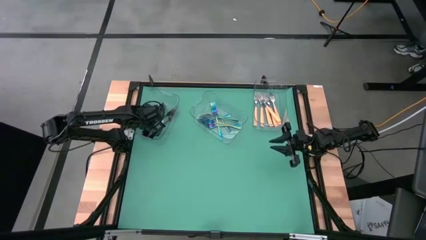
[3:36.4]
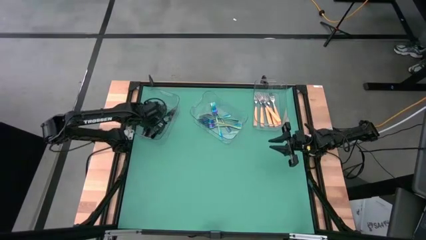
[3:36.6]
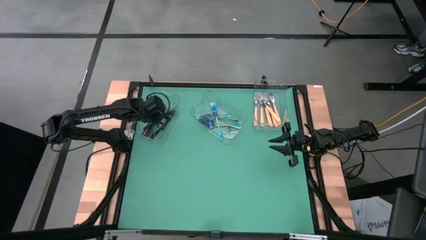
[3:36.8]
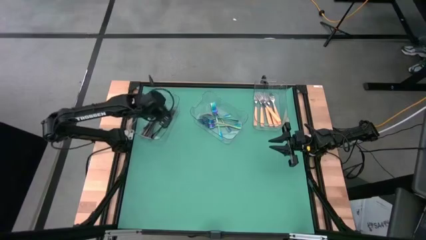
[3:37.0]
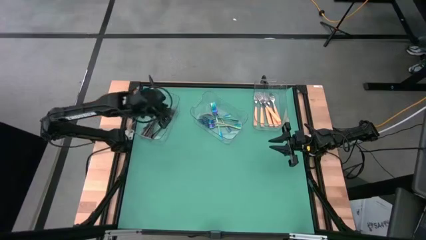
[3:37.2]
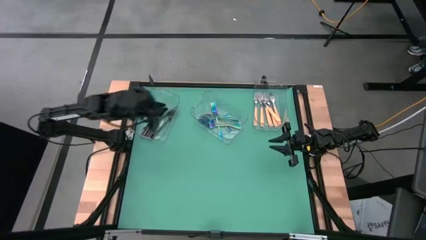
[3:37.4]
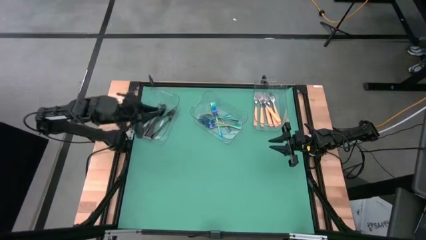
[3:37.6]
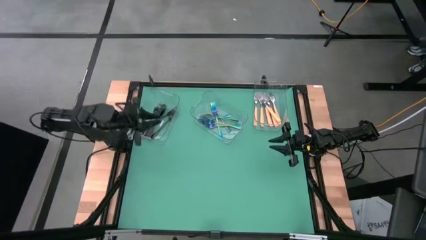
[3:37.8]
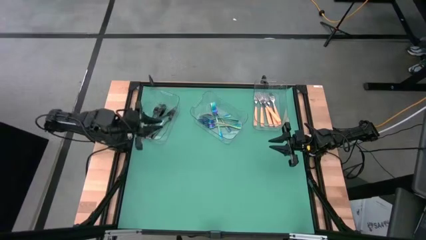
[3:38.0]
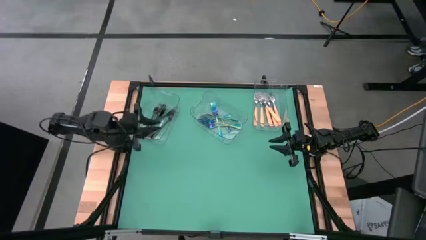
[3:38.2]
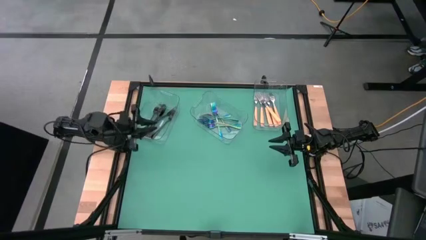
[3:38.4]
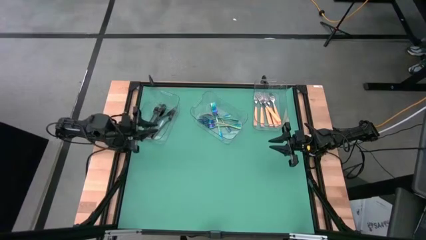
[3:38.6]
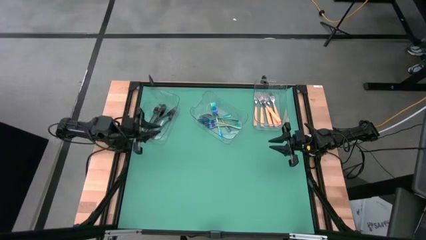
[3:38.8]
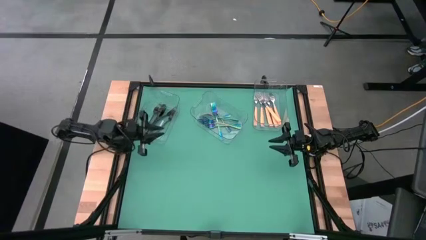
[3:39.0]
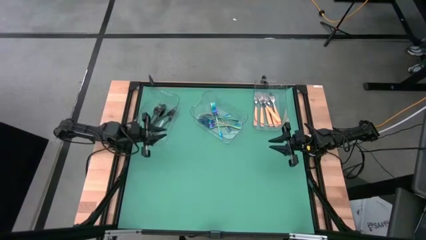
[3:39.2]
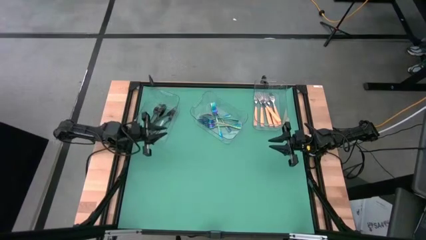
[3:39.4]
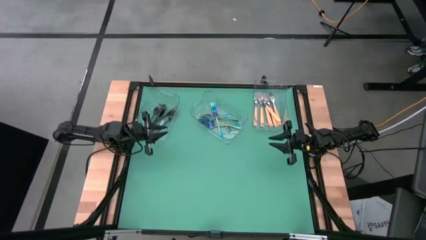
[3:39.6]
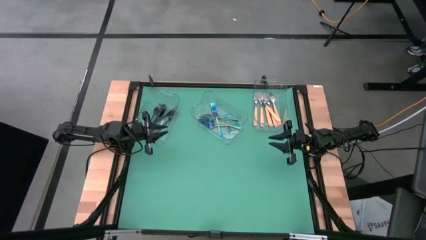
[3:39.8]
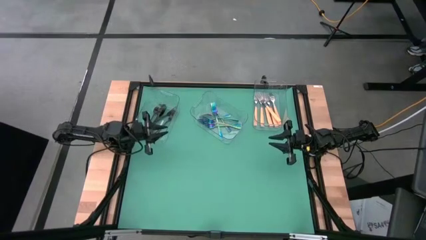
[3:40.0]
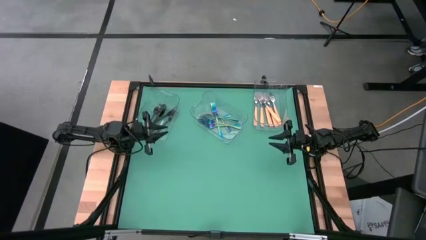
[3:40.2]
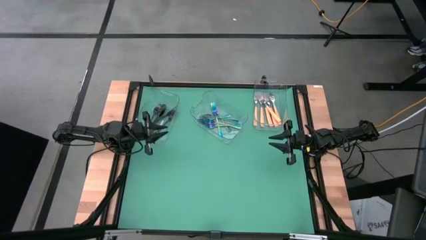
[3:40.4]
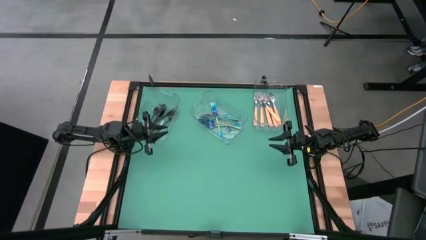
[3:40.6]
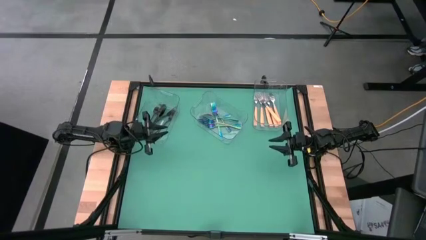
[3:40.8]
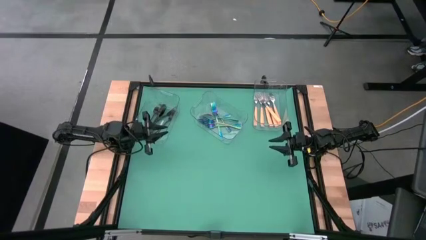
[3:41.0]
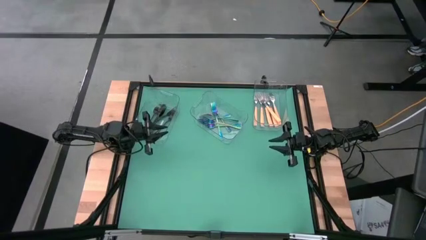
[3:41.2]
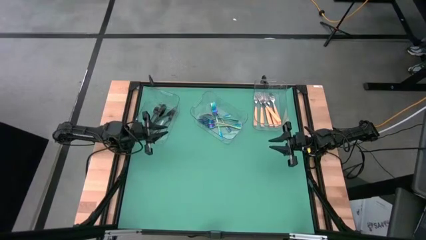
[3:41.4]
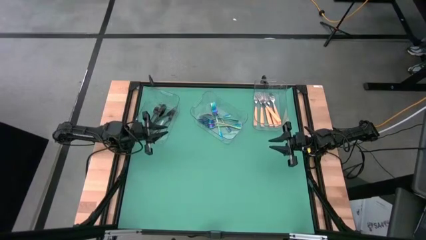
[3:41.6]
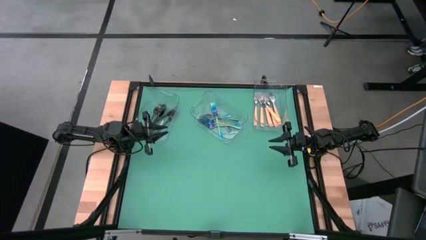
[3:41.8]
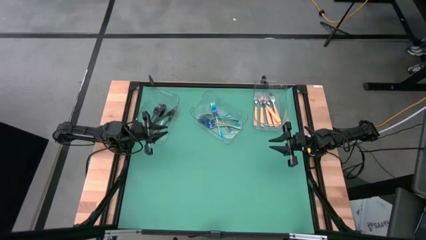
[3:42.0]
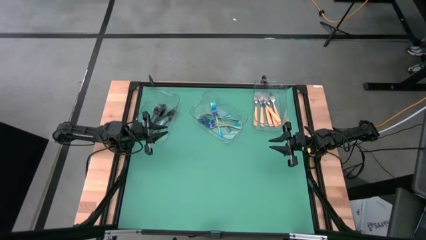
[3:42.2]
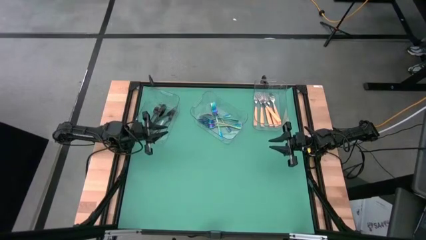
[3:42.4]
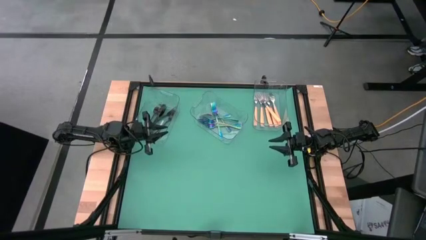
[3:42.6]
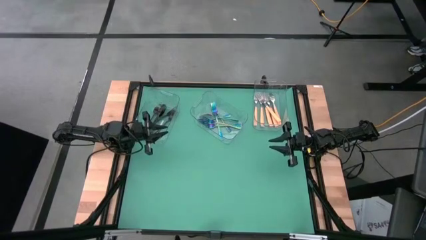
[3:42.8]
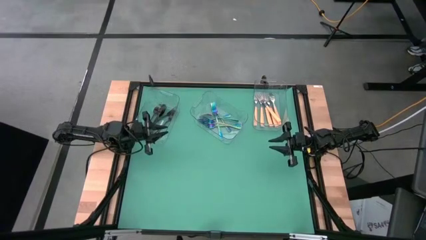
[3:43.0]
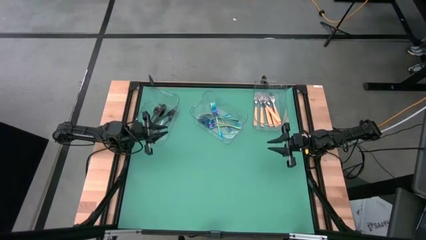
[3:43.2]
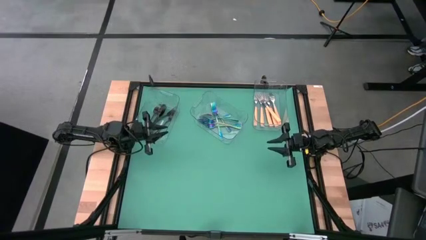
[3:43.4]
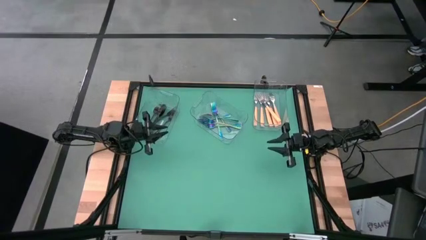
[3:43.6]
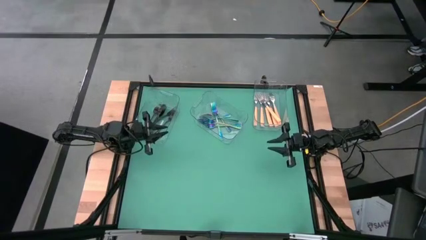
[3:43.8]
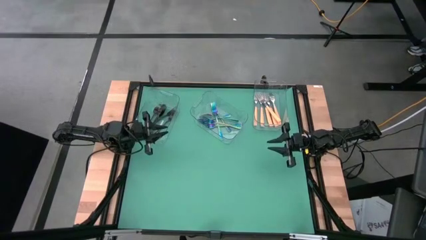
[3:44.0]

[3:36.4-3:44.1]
Task: Sort silverware by color (type)
Return to Home Position

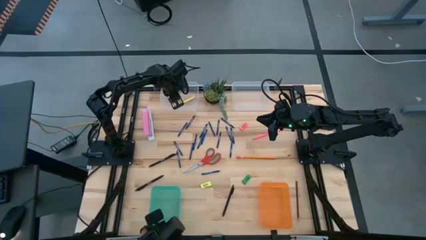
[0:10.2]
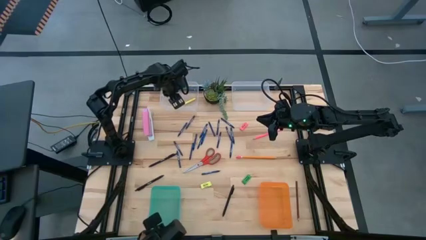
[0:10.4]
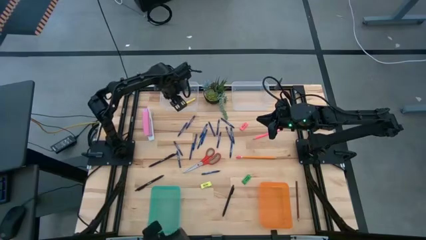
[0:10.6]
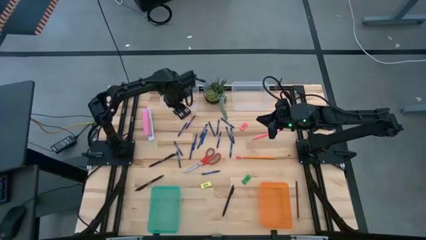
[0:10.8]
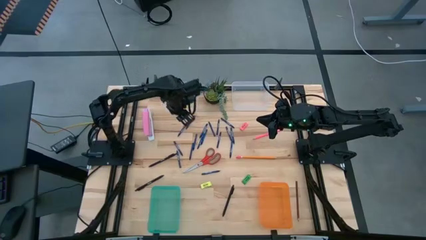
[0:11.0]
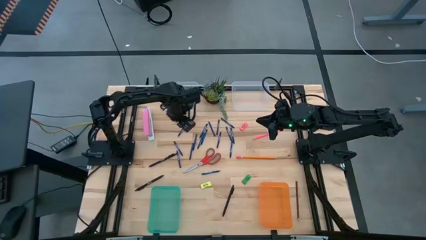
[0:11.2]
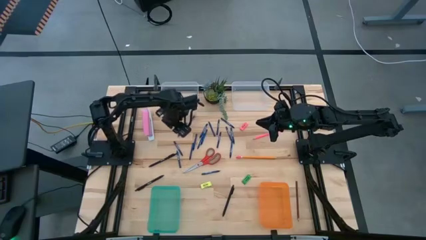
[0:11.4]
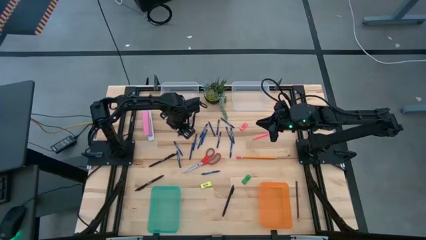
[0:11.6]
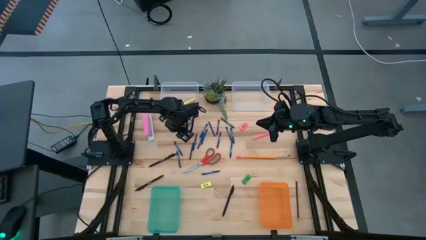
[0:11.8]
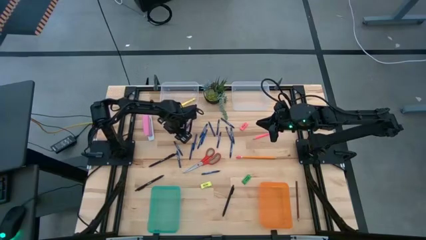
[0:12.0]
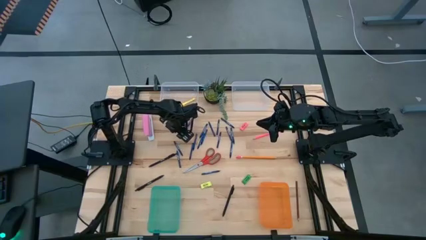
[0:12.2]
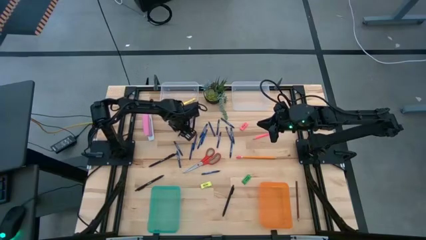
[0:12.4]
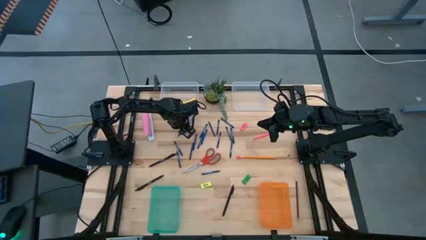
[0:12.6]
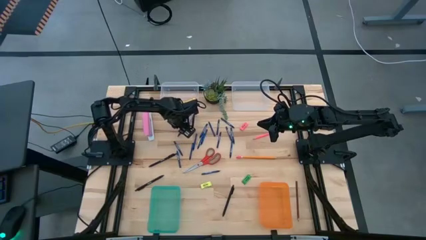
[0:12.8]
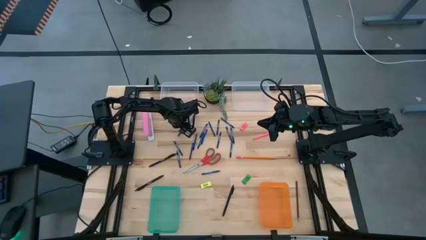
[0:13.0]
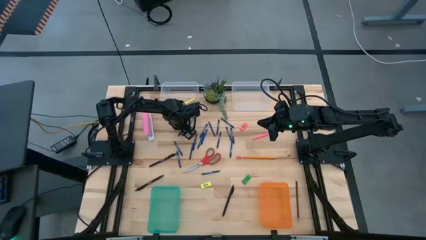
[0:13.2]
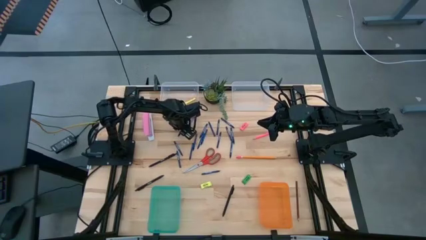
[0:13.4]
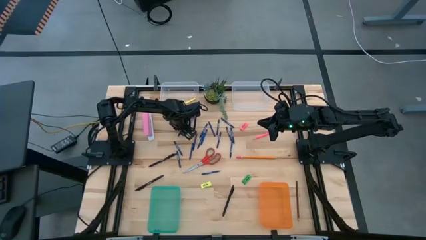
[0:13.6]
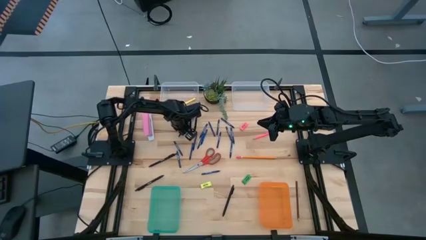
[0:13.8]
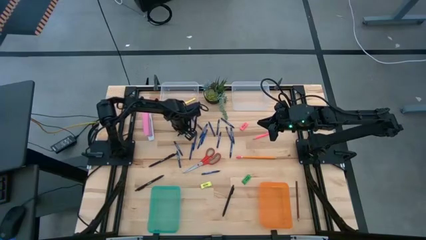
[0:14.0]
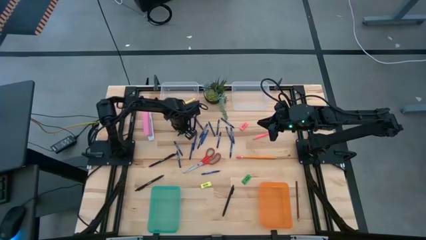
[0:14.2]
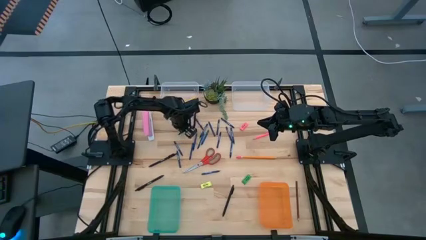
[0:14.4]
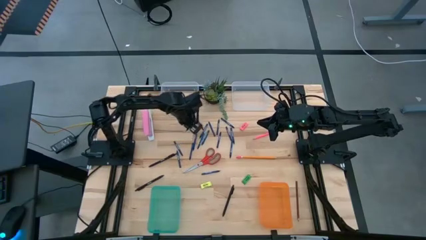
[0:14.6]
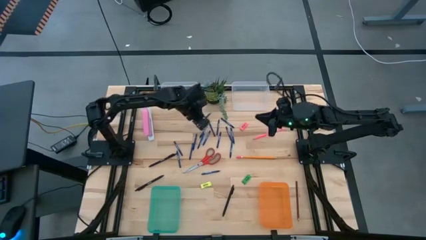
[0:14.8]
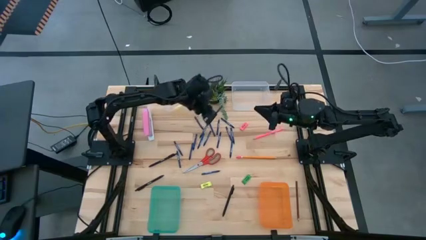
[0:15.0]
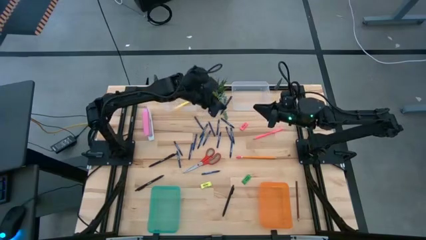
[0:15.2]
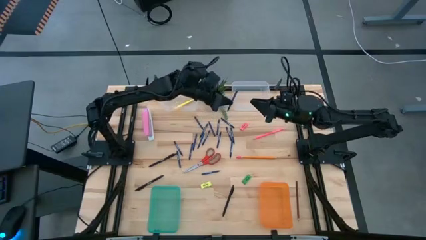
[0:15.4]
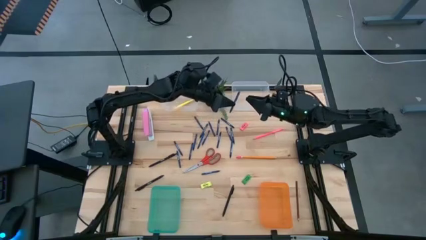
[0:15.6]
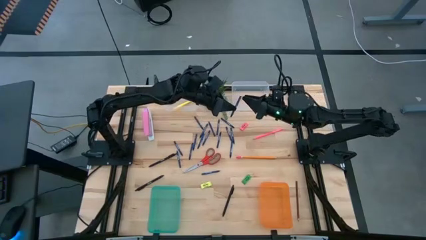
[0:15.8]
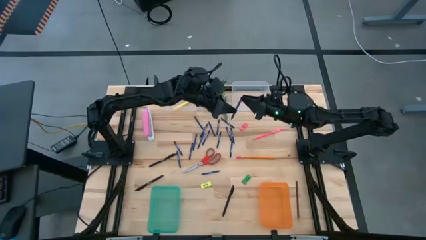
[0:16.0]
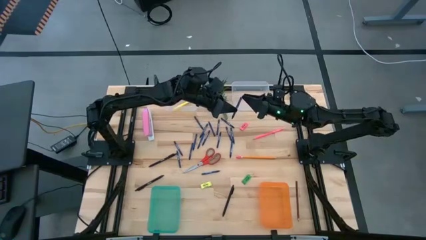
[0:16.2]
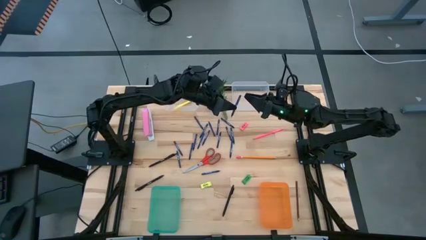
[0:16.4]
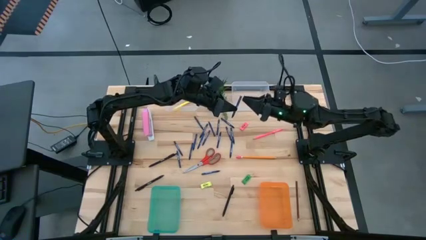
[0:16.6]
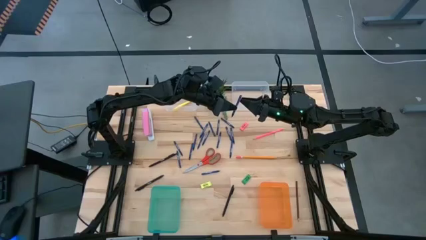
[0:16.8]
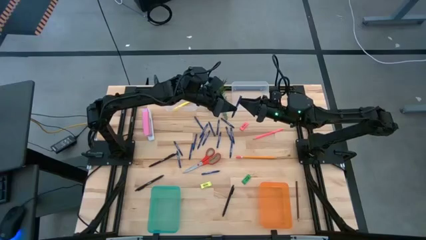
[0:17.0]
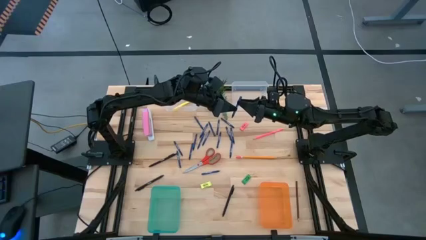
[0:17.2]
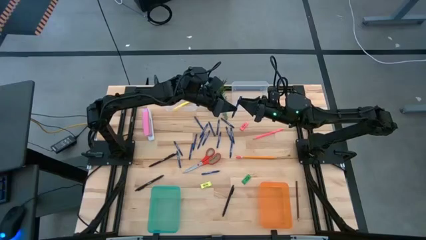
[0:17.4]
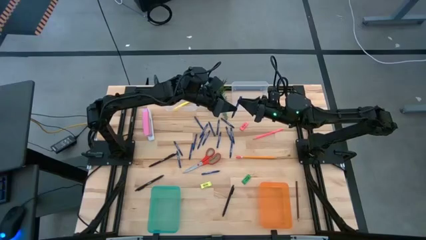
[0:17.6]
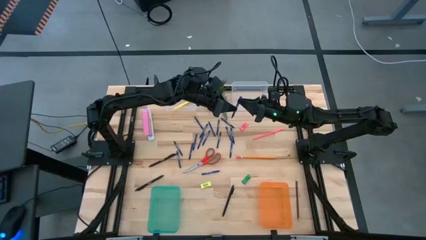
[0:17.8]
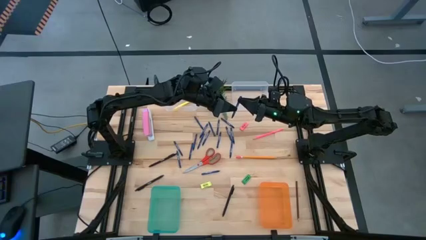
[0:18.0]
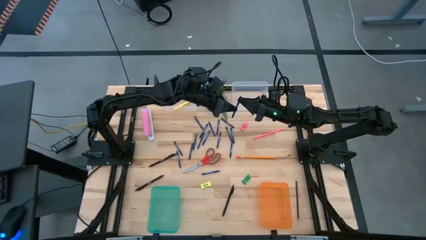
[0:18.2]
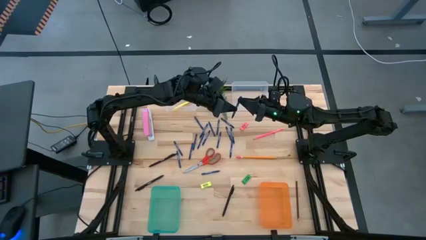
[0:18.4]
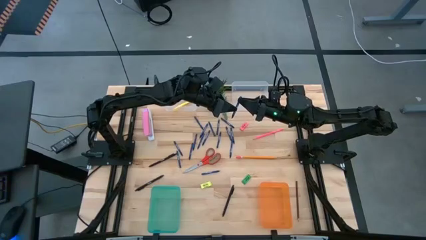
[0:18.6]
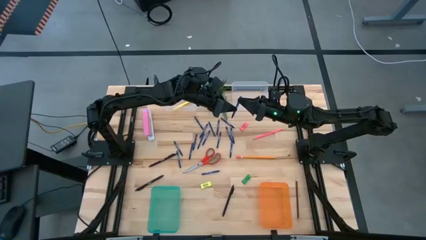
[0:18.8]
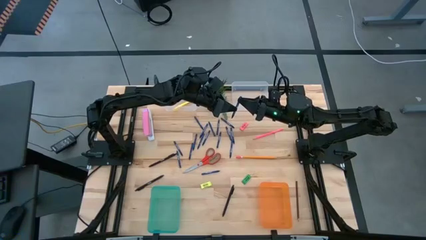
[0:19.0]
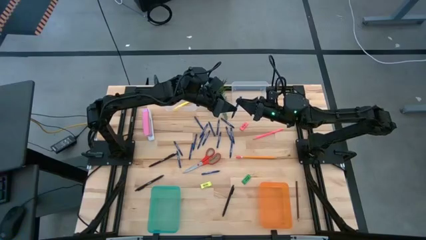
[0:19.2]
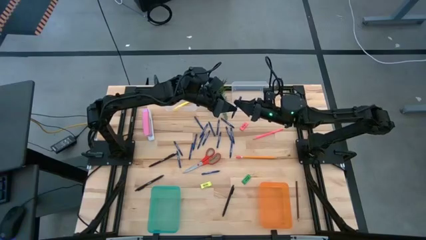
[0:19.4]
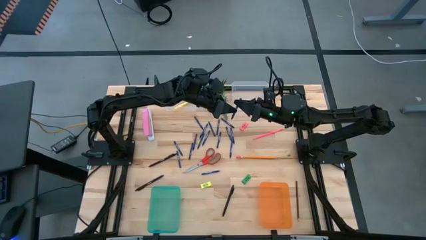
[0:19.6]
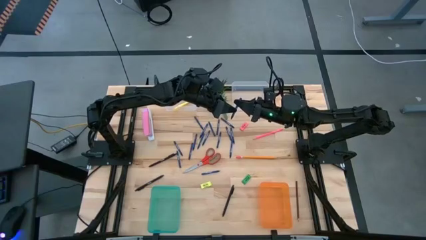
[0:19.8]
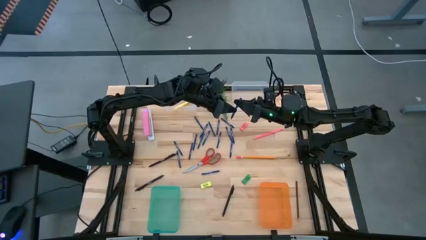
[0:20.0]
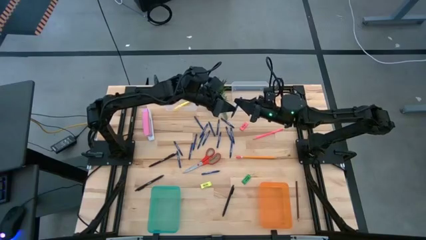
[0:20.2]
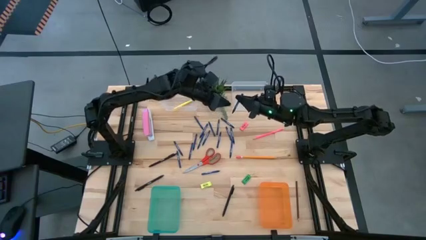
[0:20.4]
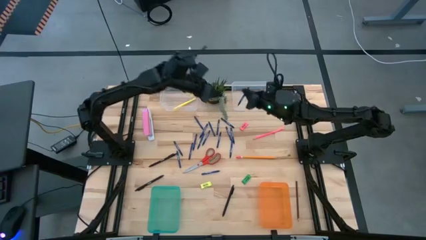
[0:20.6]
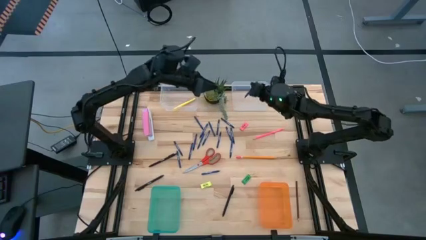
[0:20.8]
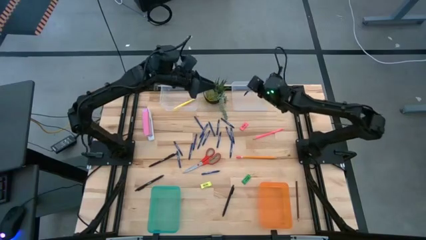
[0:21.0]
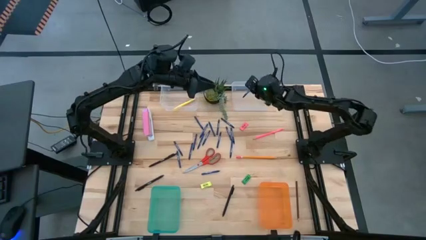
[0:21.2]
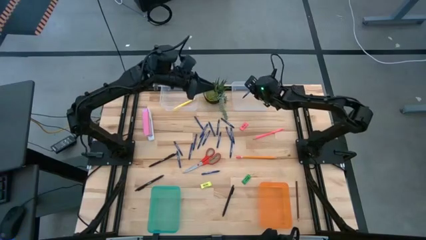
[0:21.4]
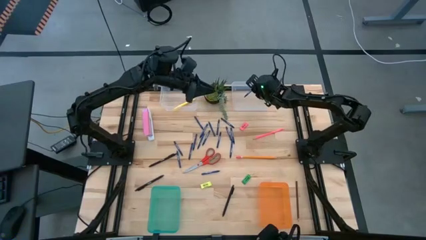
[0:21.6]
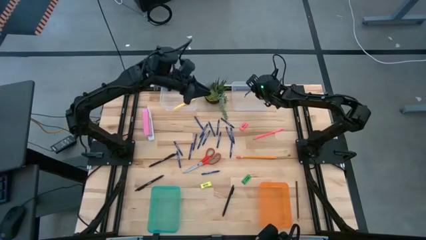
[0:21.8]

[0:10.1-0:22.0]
Task: Sort crayons/erasers/pens/pencils in bins
Put the blue crayon into the right transparent bin
